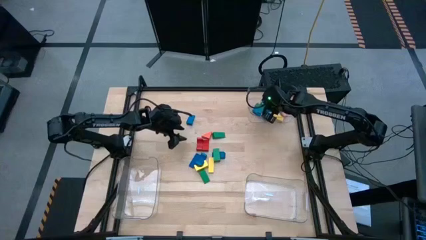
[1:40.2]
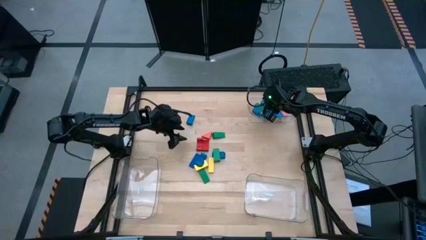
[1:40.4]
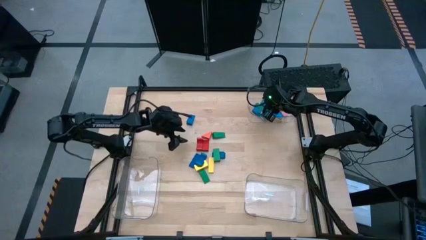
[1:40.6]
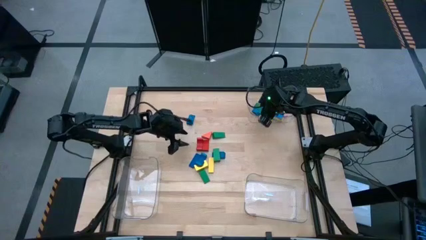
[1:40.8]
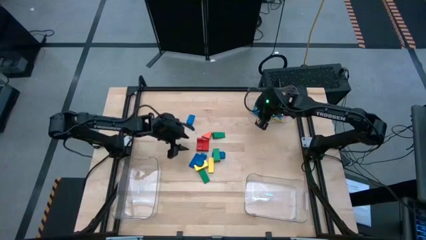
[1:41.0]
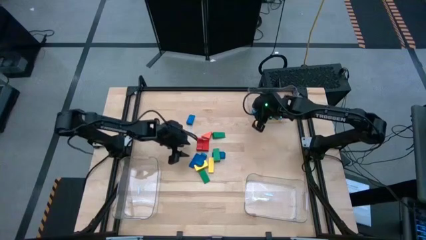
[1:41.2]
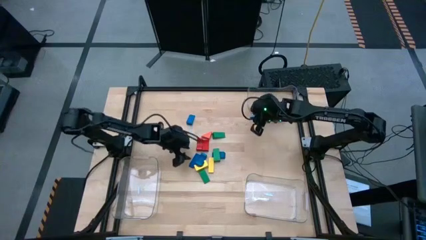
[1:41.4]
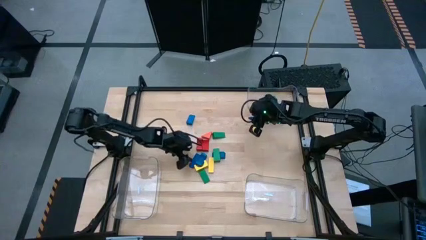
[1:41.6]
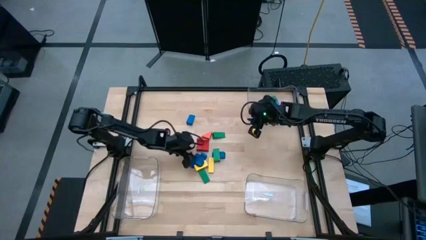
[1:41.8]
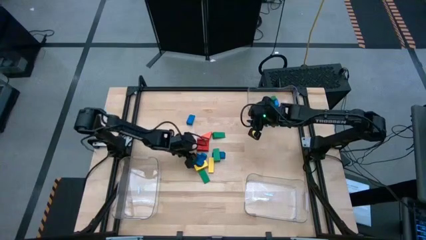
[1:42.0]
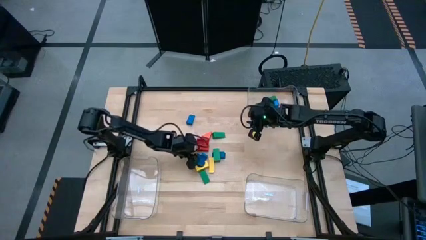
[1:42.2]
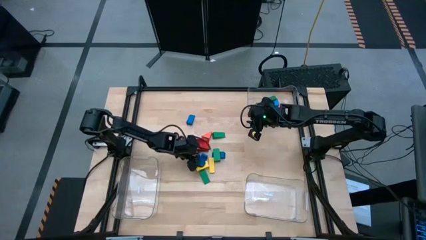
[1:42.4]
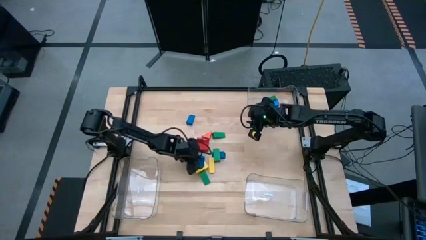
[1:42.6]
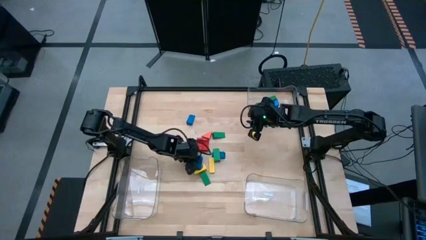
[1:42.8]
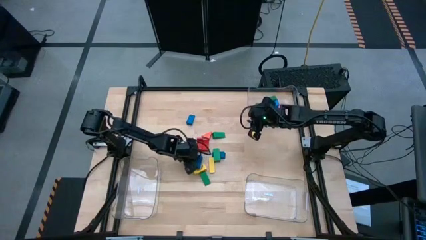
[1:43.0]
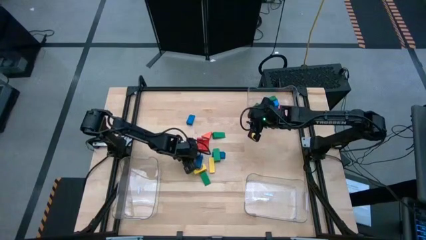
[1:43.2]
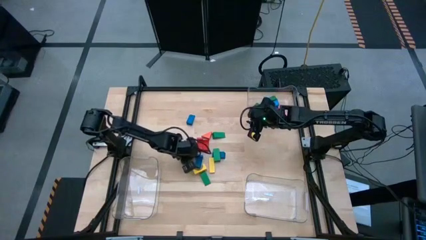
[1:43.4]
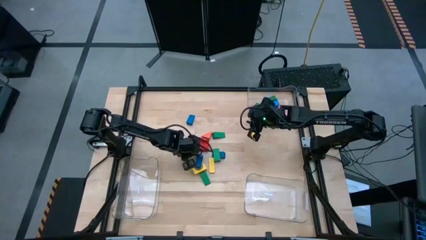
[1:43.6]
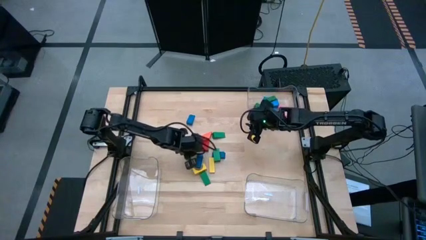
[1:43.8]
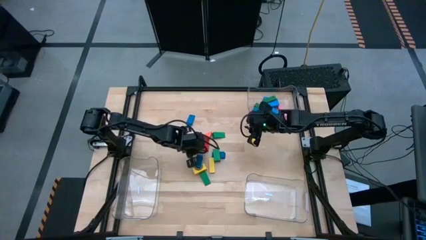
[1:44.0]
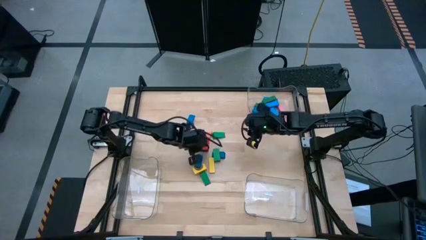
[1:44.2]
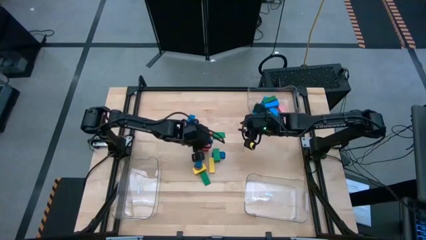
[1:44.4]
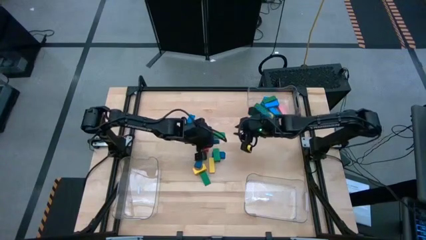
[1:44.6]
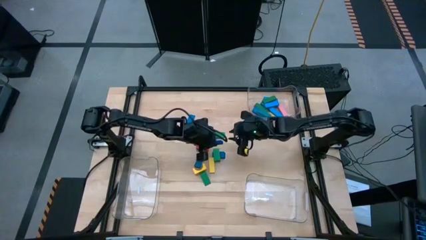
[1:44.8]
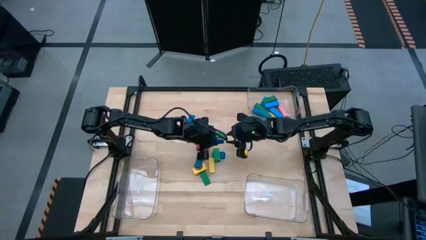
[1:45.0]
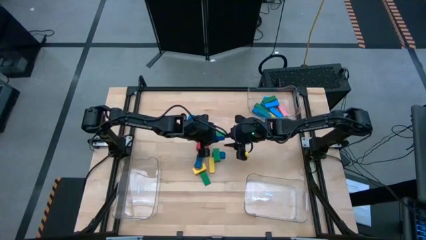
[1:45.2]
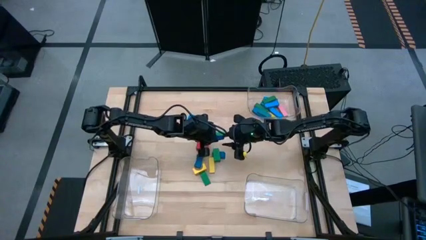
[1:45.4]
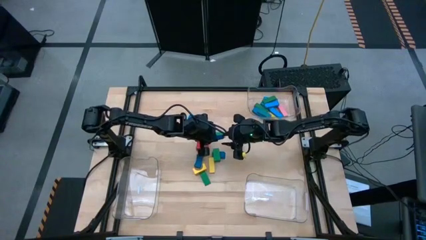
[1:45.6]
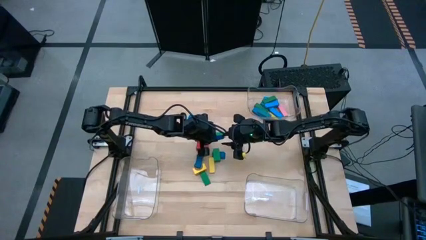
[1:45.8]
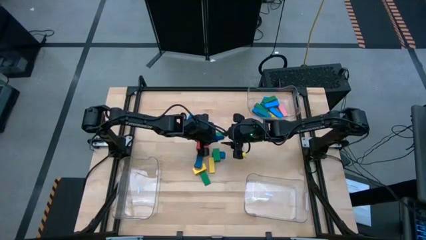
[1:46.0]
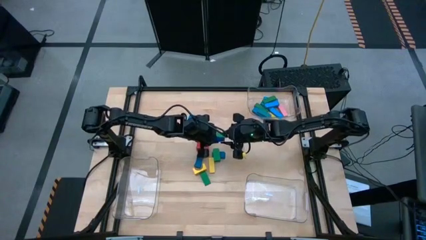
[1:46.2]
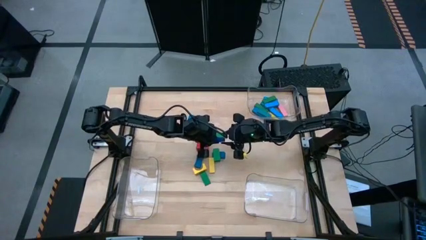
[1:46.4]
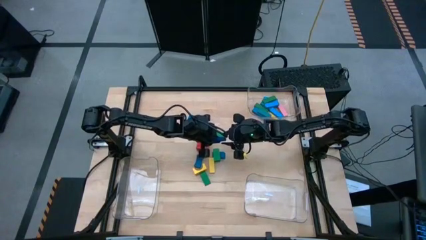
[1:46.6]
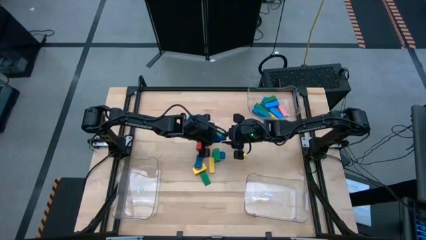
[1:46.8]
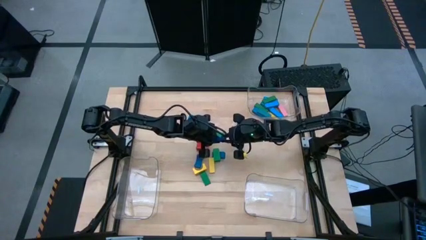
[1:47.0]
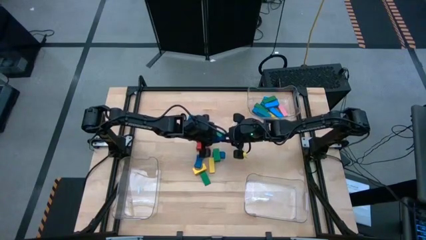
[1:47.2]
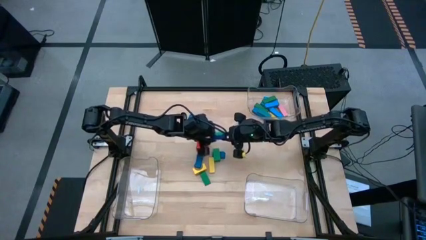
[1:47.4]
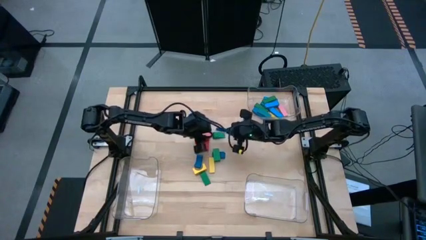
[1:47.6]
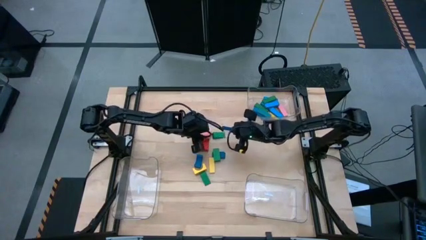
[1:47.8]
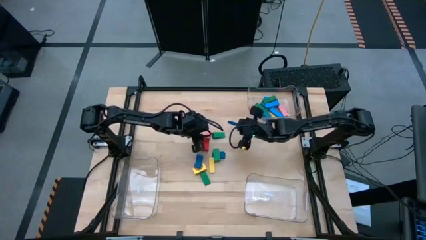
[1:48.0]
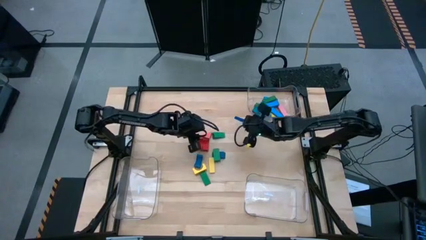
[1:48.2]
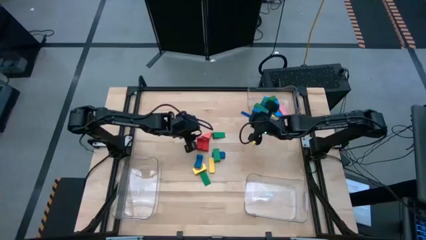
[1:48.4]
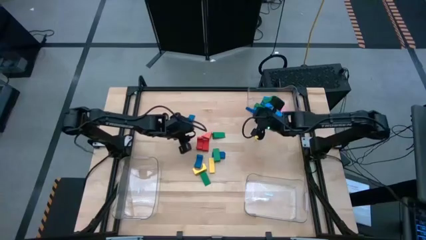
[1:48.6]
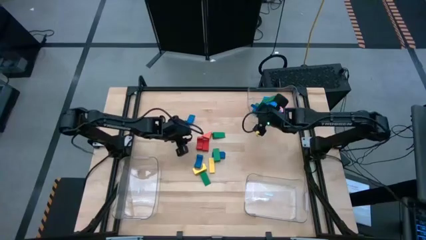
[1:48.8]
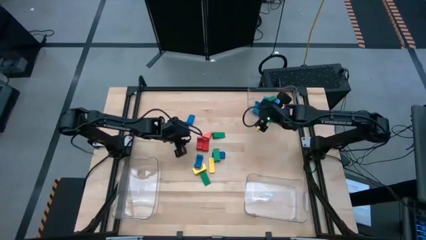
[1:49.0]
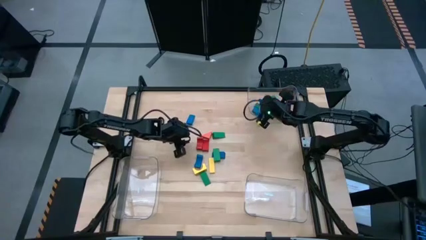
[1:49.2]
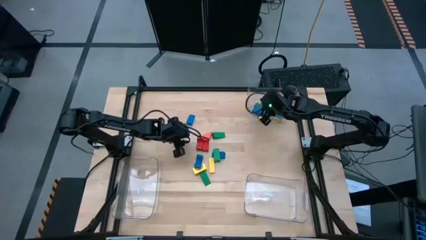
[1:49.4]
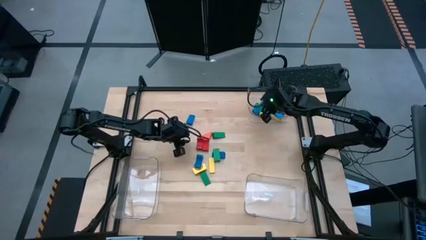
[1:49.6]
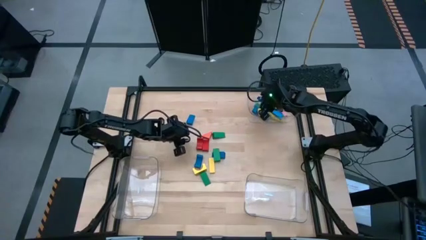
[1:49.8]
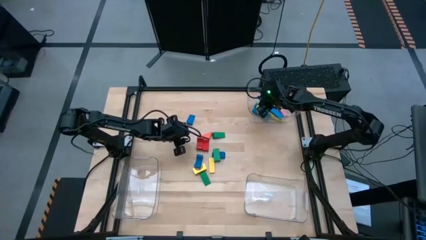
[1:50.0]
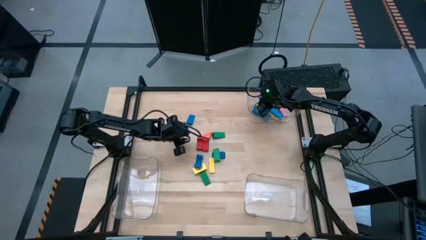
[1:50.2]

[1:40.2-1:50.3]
Task: Sort blocks by size
Put the blue rectangle block into the top transparent bin
